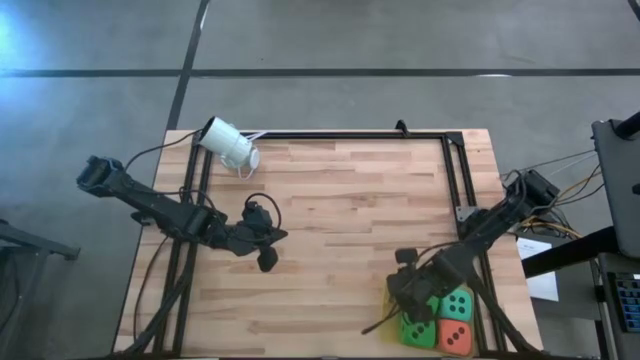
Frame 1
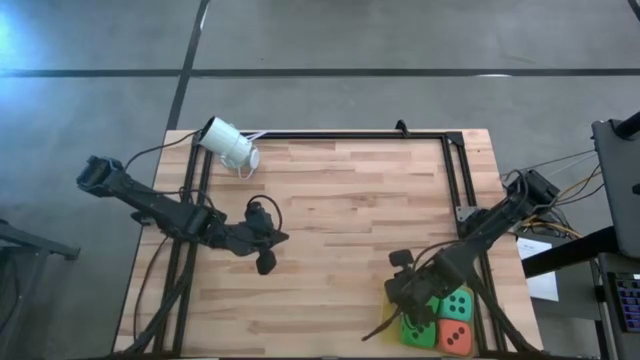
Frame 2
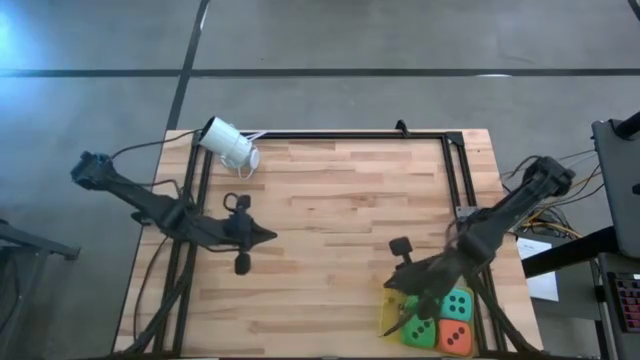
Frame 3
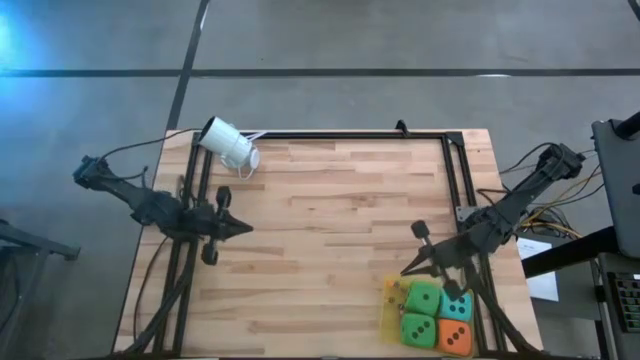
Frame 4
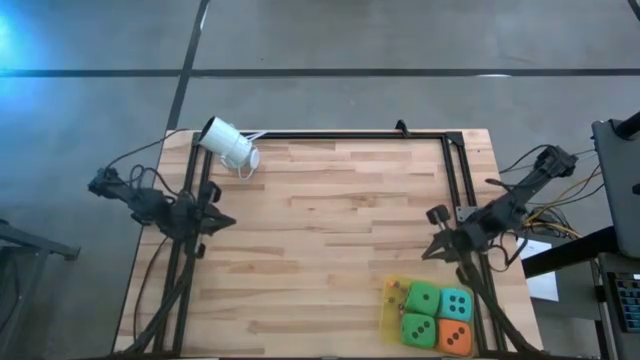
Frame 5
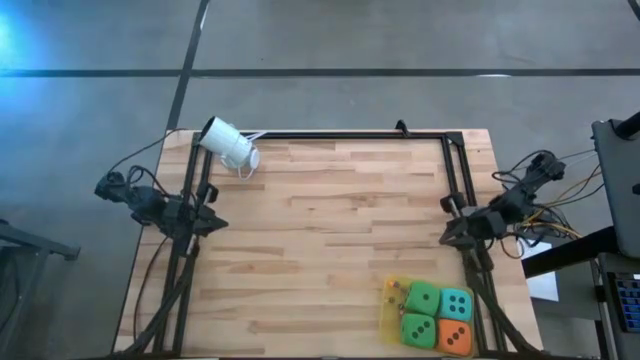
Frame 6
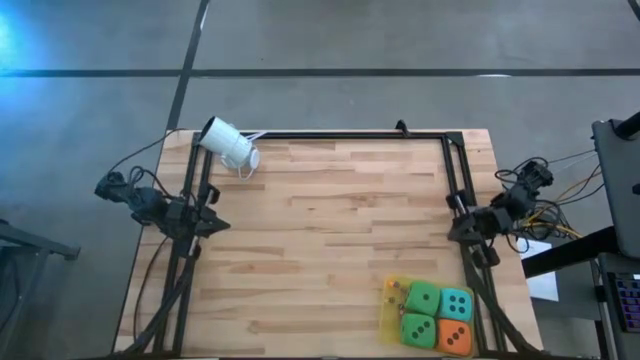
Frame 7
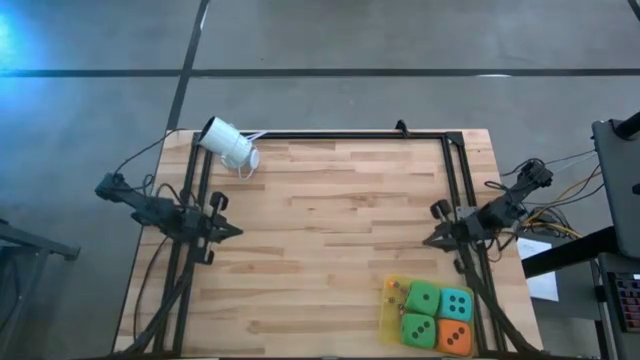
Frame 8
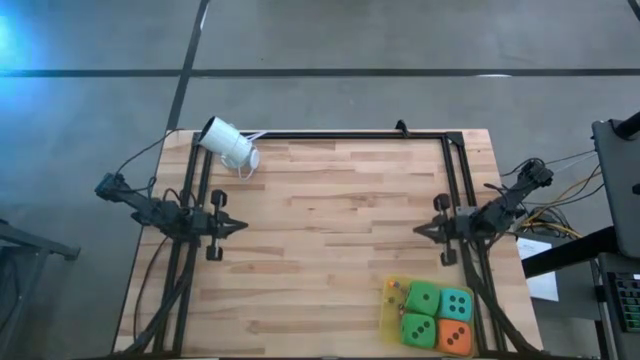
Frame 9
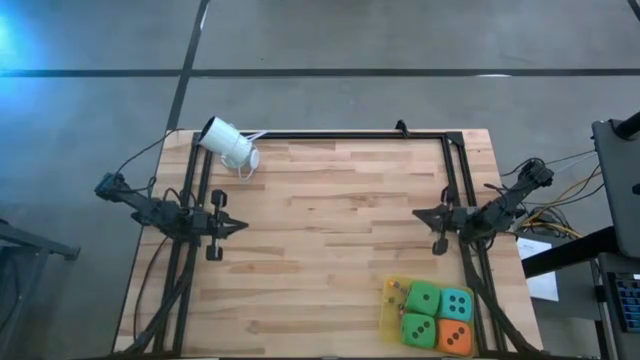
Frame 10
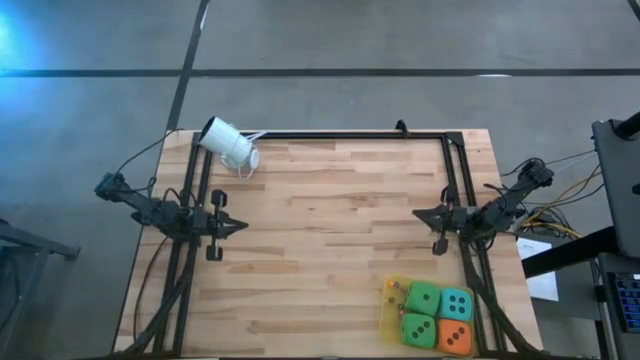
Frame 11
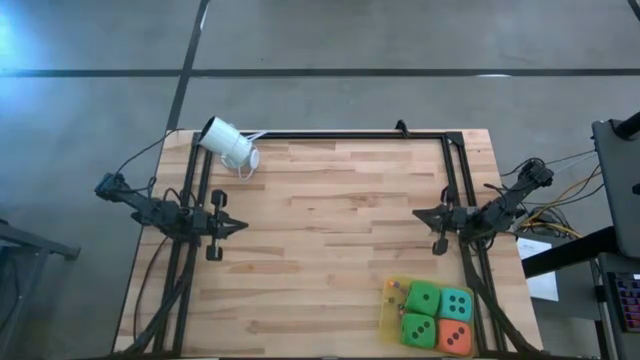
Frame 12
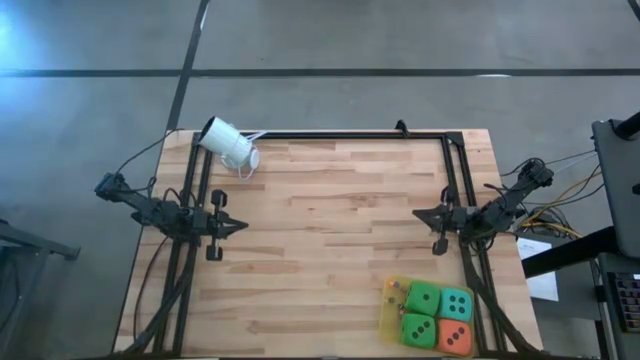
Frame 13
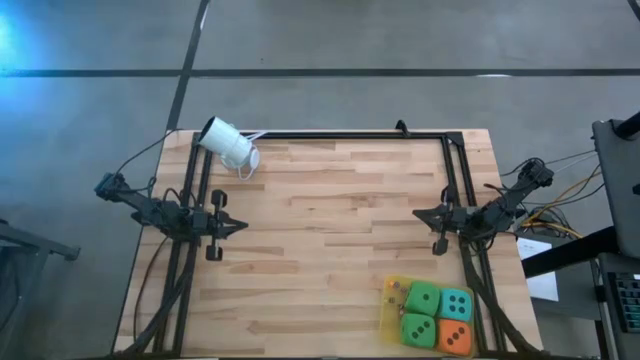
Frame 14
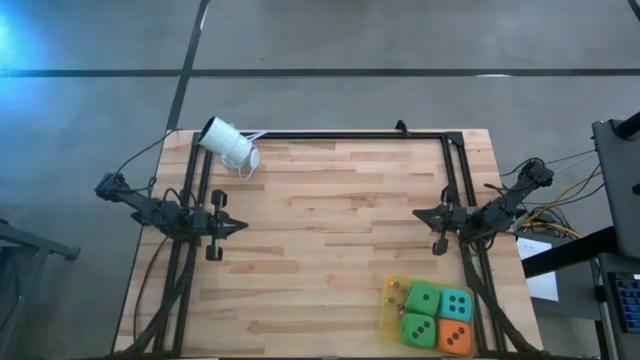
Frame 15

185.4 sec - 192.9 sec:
Task: Pick & Place Dice
Return to Home Position

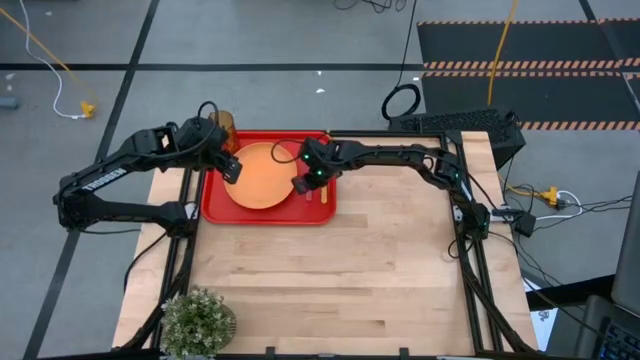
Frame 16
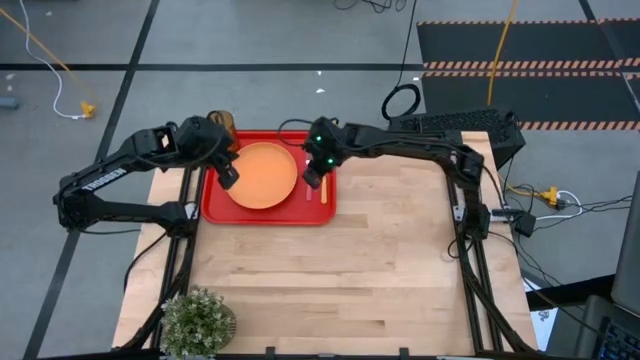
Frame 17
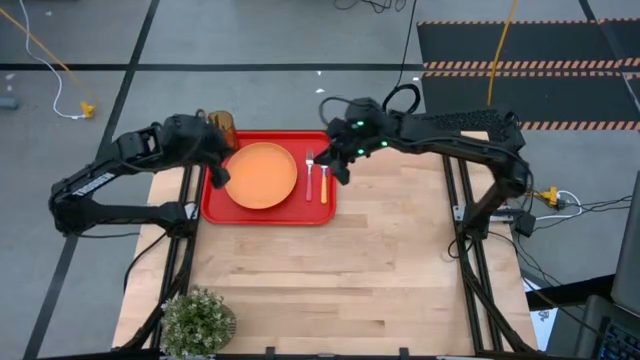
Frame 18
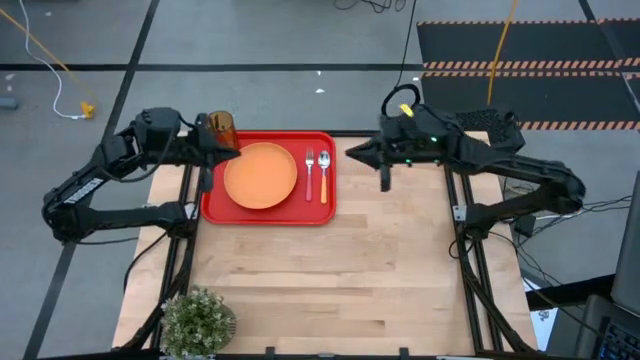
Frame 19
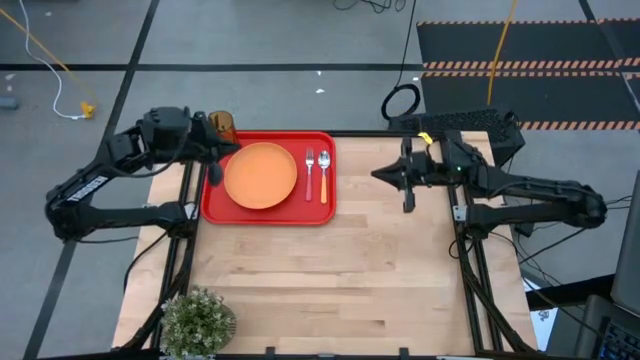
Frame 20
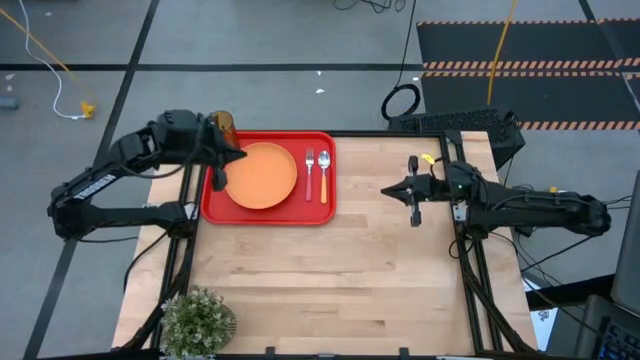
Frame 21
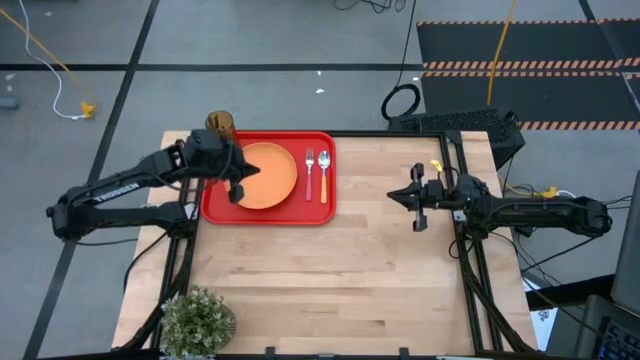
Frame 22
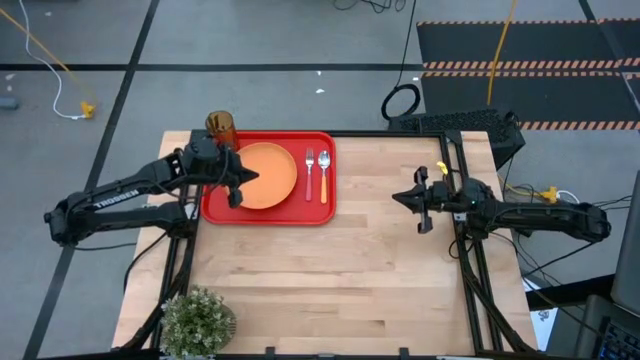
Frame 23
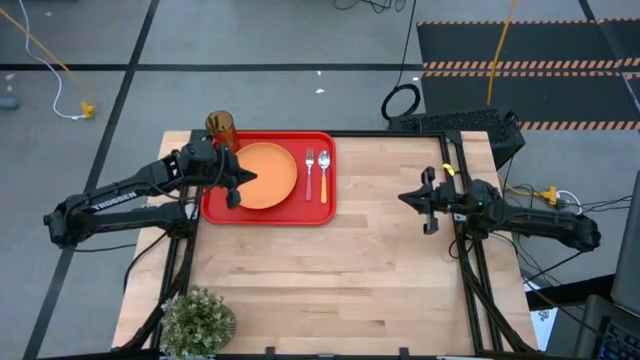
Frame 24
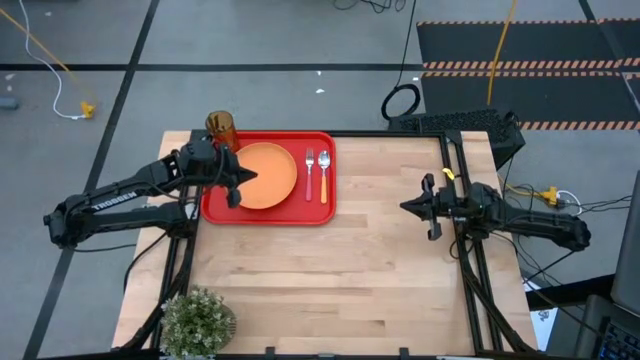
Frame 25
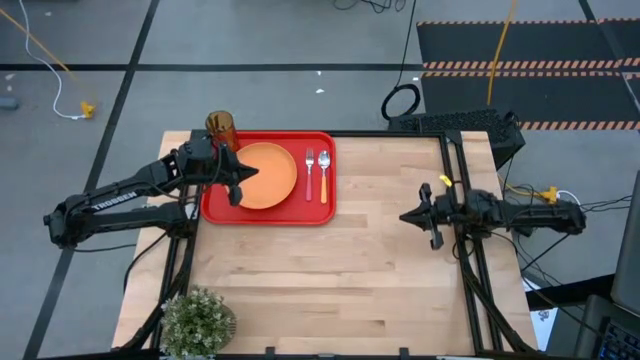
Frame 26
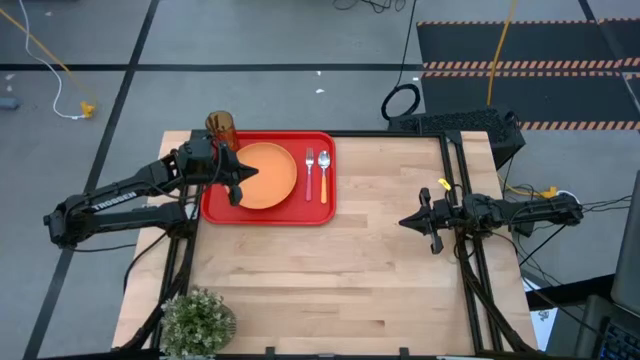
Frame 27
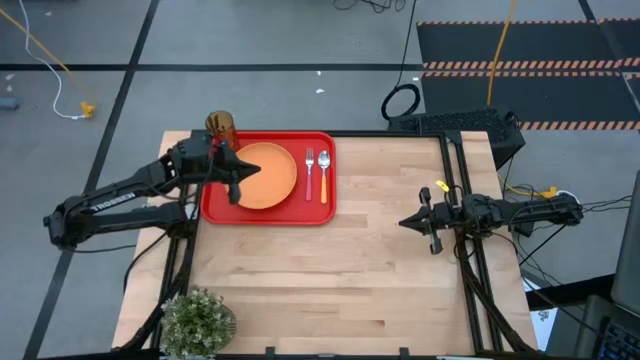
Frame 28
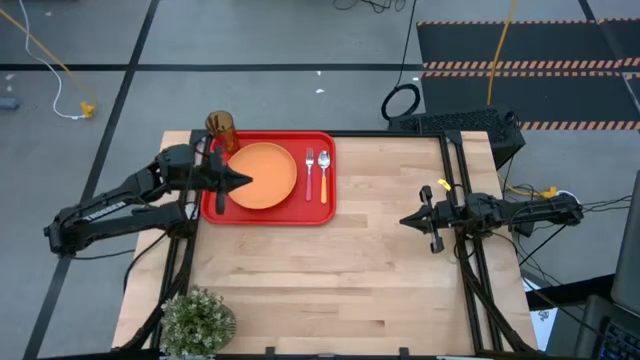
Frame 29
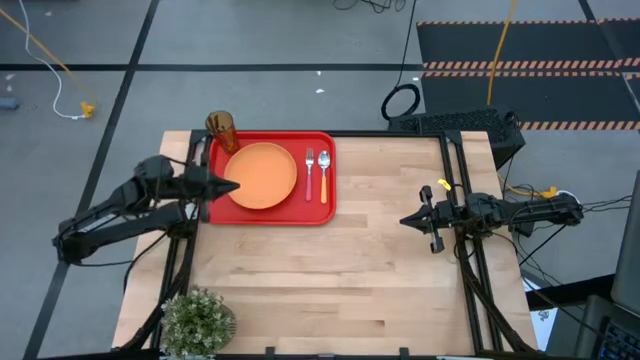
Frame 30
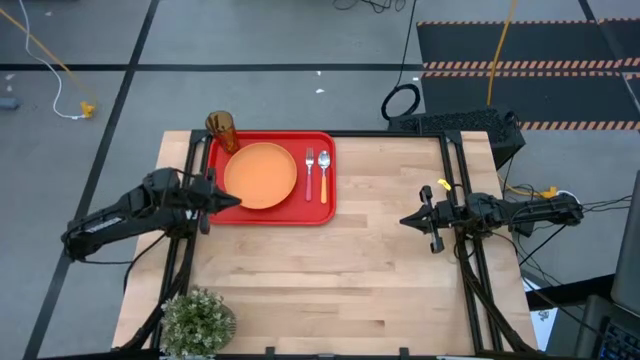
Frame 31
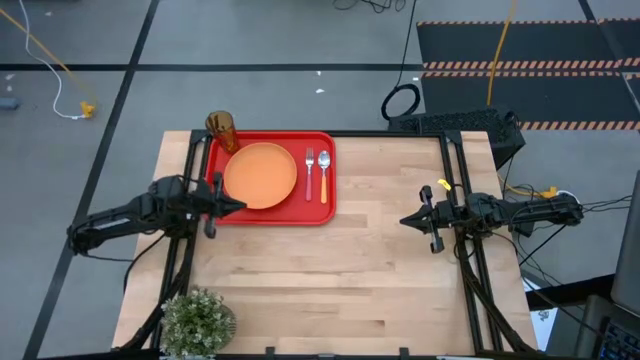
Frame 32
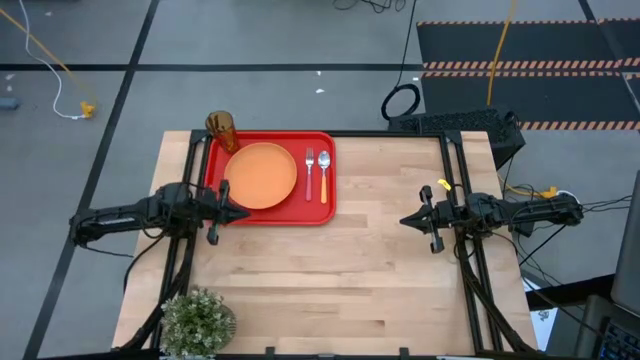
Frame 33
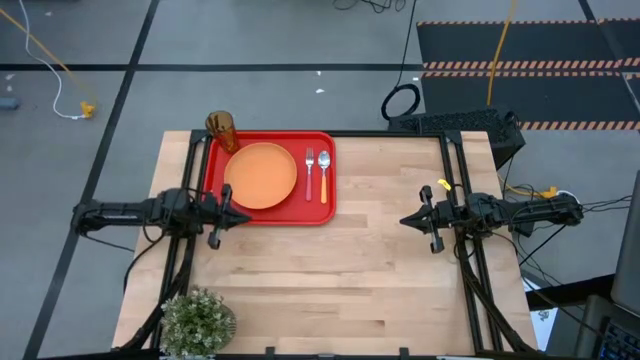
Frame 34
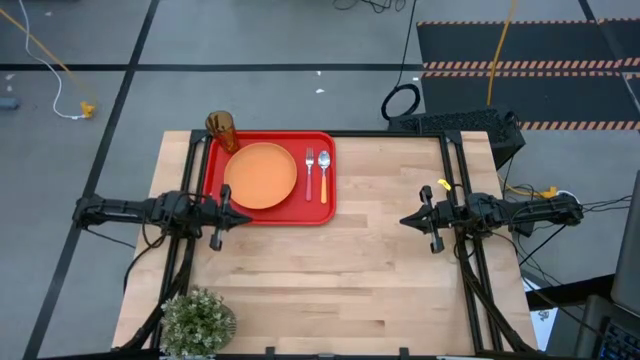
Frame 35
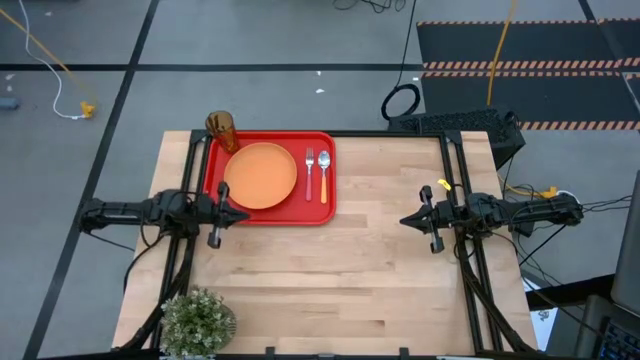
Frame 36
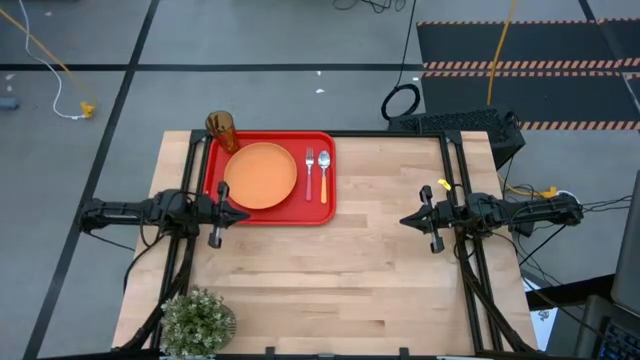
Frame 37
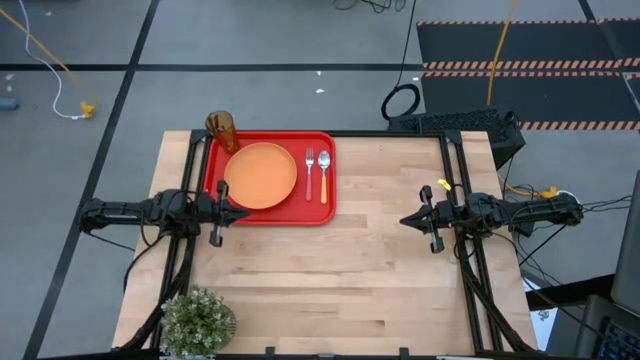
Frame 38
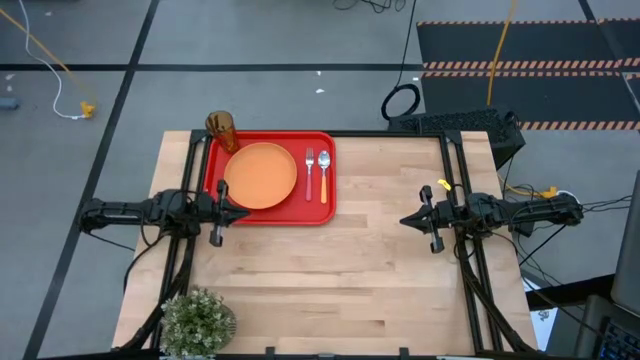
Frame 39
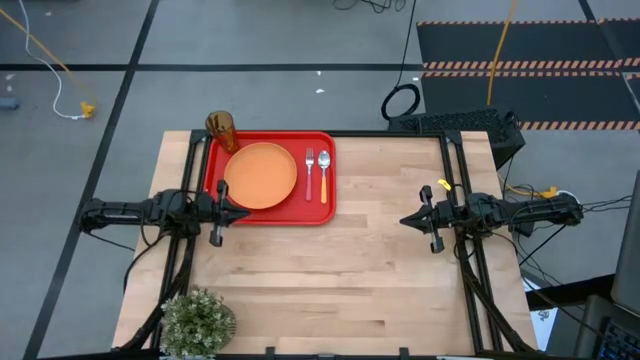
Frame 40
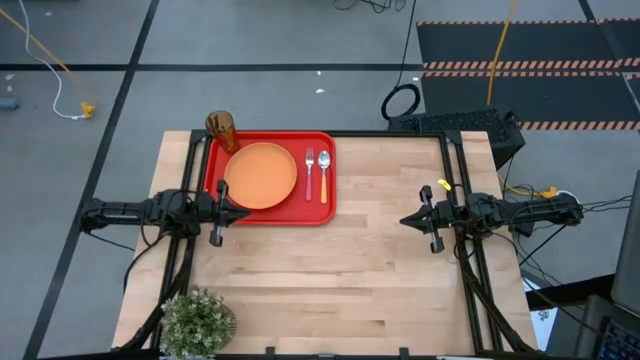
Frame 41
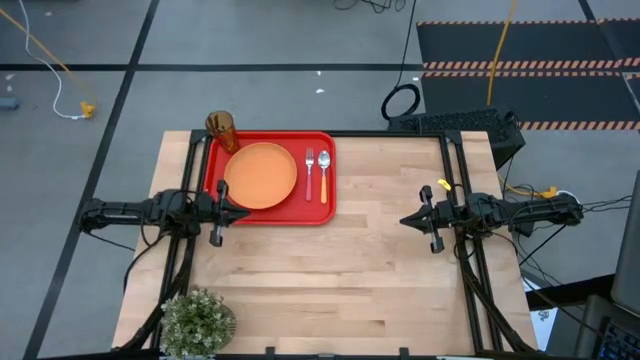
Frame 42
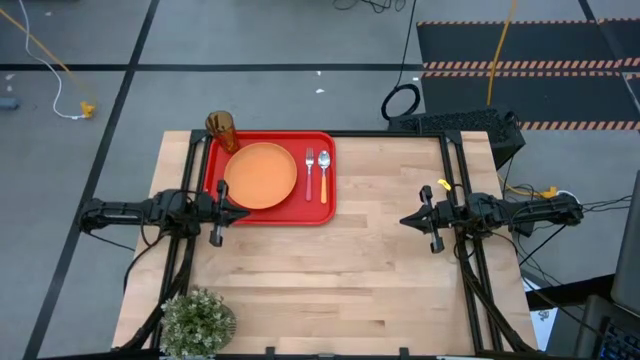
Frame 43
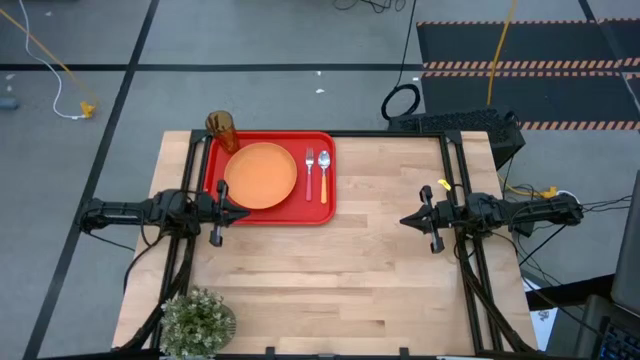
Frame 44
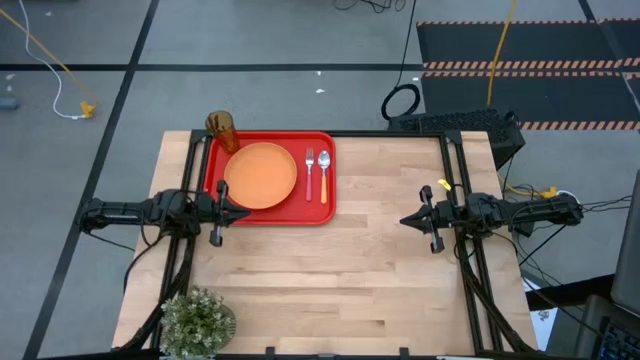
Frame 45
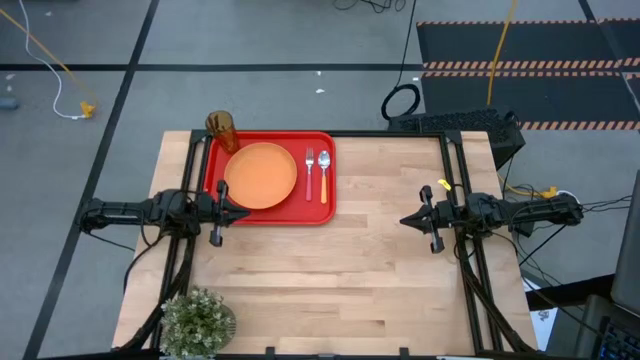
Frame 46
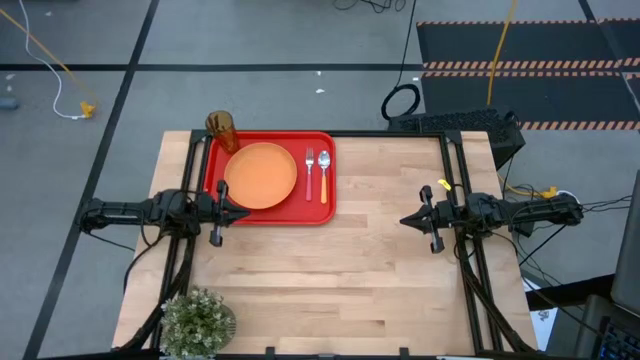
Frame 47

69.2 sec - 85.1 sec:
Task: Pick and place plate/cup/fork/spoon on tray
Return to Home Position
